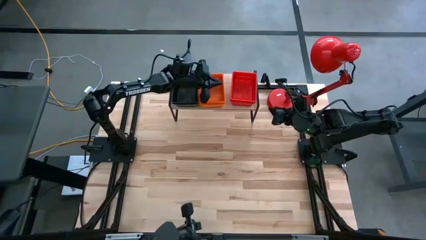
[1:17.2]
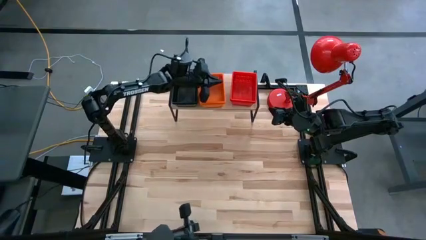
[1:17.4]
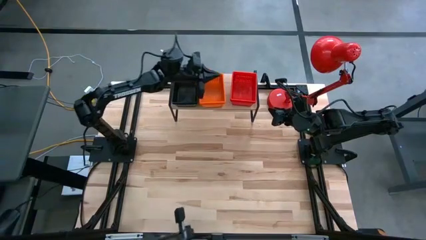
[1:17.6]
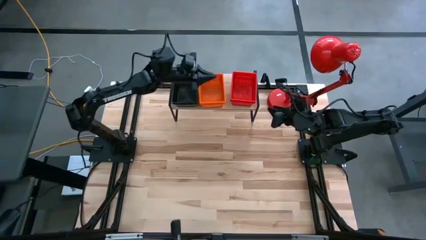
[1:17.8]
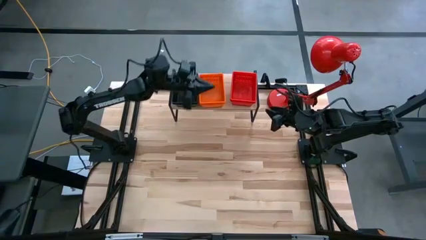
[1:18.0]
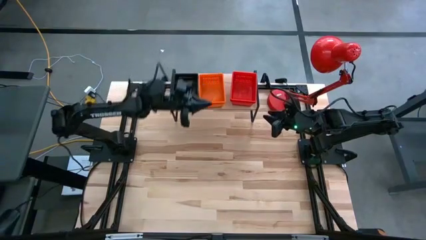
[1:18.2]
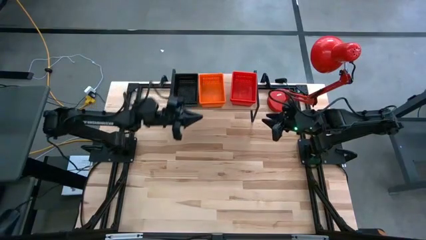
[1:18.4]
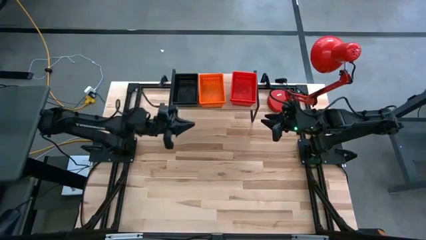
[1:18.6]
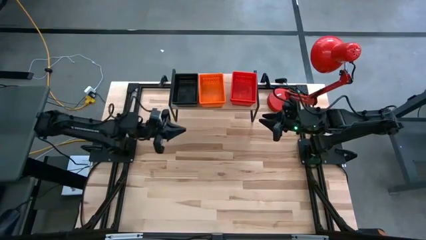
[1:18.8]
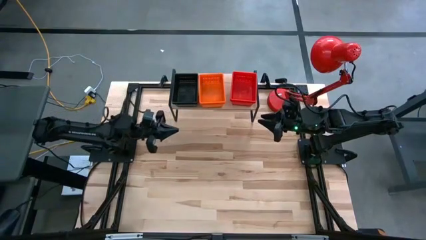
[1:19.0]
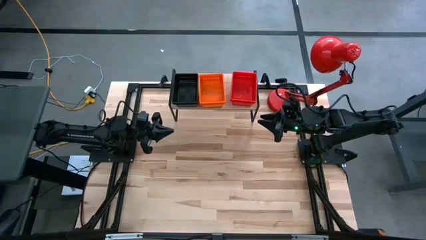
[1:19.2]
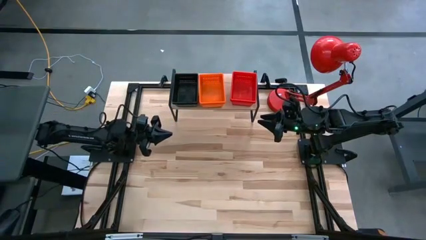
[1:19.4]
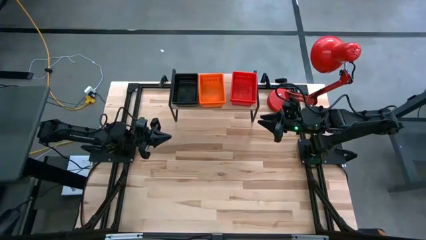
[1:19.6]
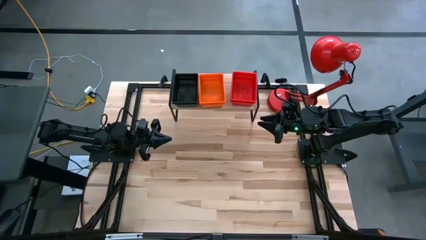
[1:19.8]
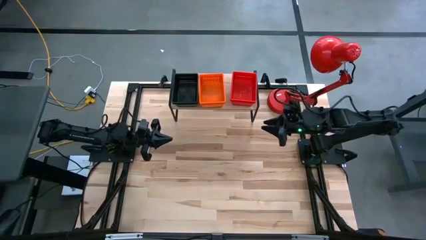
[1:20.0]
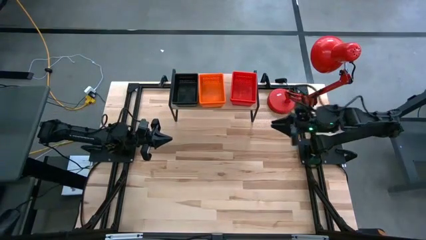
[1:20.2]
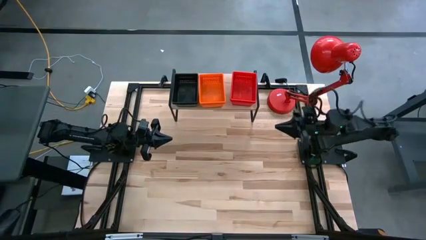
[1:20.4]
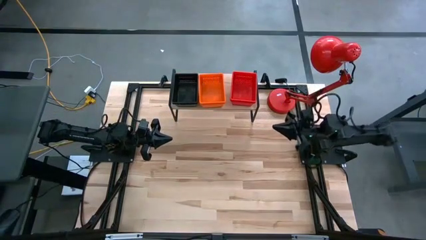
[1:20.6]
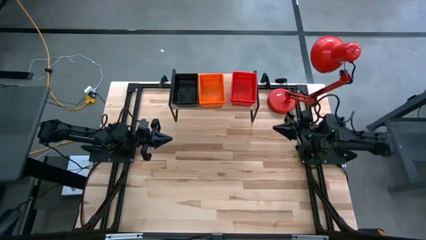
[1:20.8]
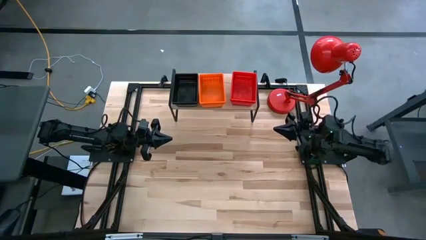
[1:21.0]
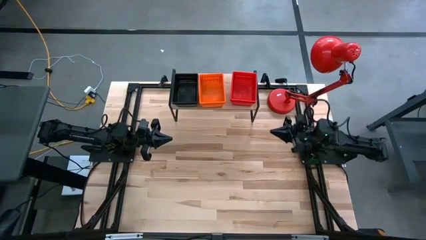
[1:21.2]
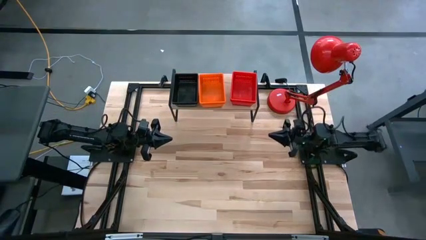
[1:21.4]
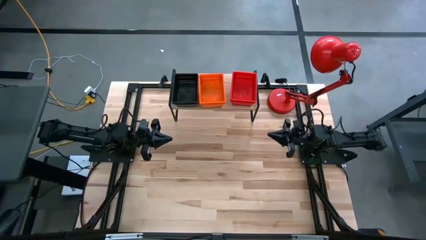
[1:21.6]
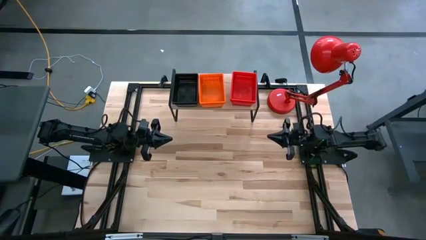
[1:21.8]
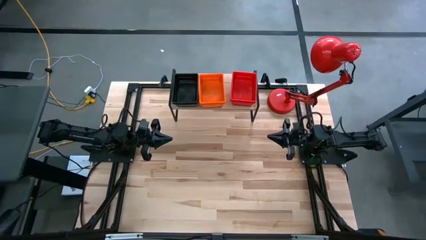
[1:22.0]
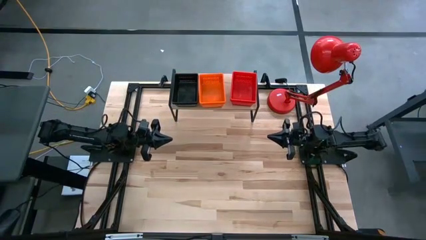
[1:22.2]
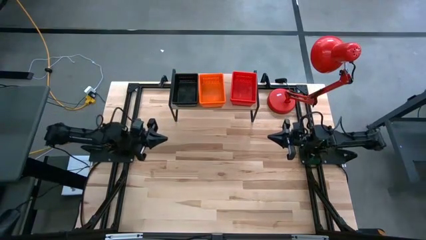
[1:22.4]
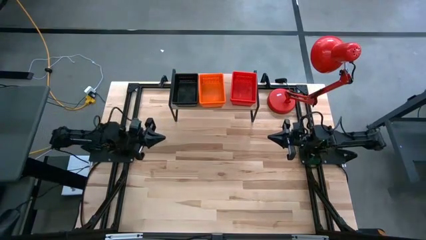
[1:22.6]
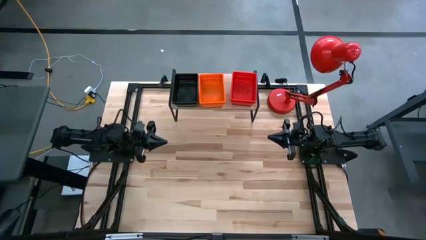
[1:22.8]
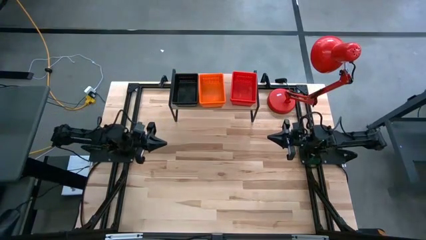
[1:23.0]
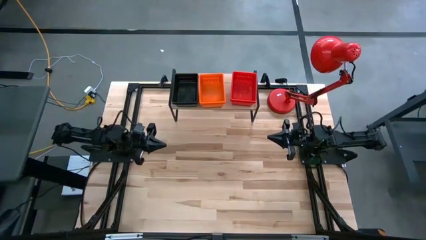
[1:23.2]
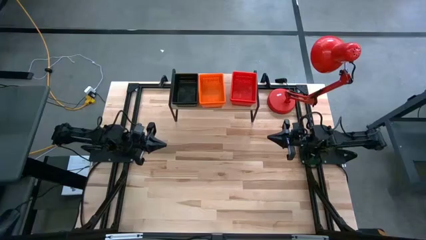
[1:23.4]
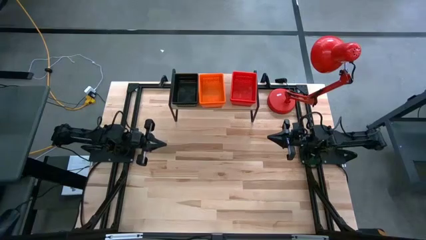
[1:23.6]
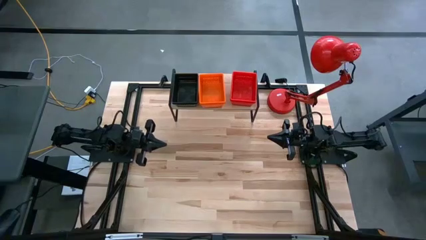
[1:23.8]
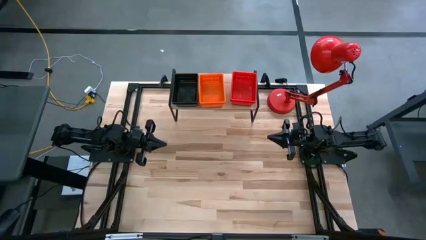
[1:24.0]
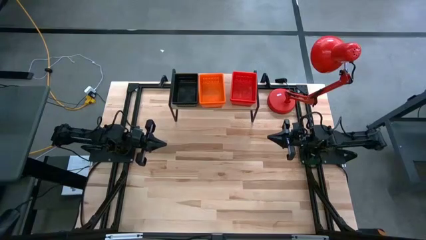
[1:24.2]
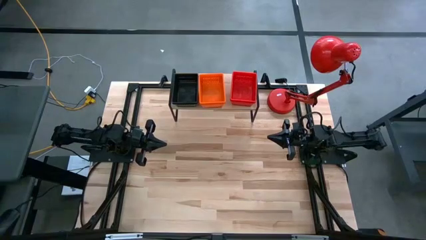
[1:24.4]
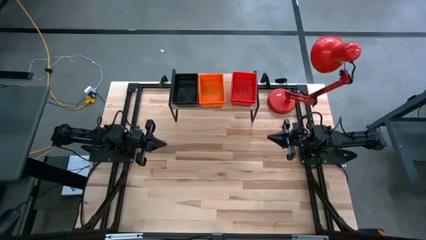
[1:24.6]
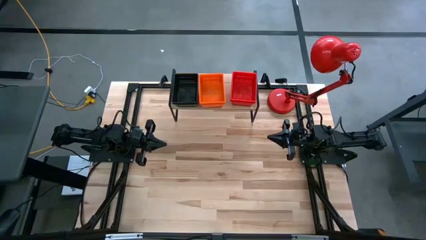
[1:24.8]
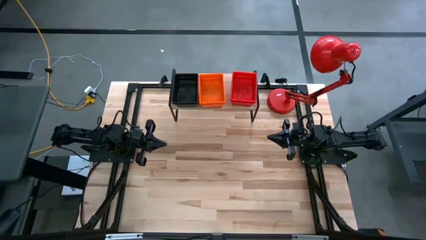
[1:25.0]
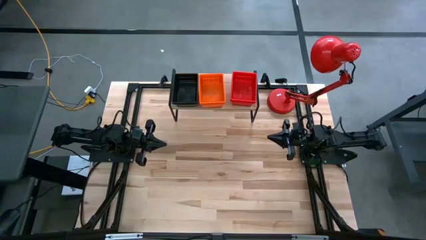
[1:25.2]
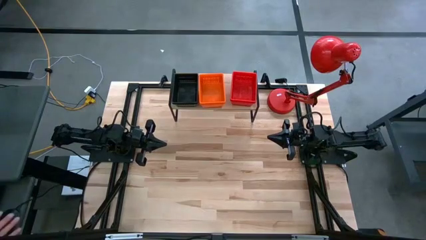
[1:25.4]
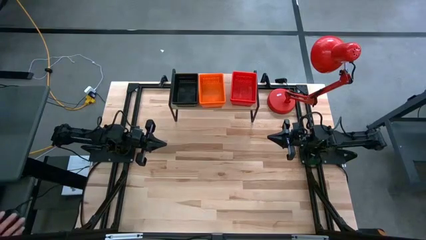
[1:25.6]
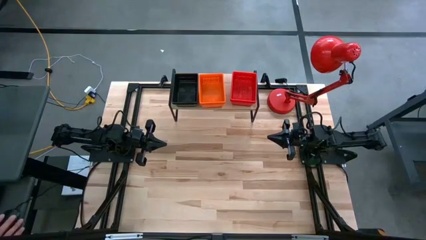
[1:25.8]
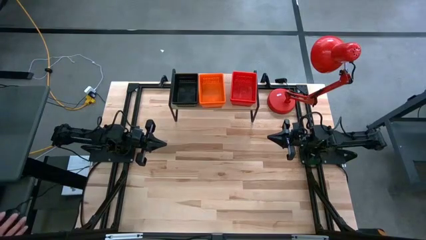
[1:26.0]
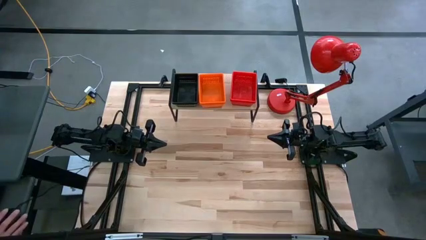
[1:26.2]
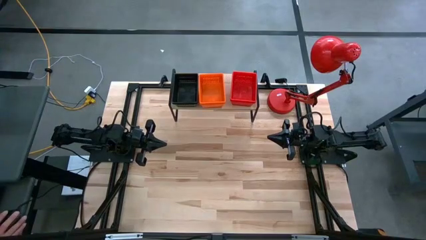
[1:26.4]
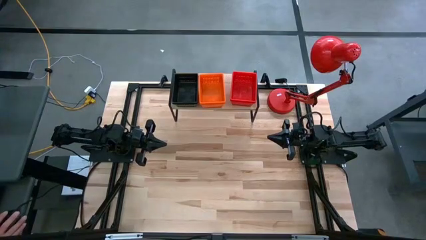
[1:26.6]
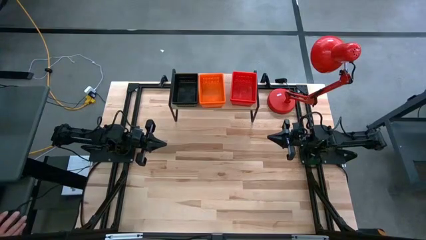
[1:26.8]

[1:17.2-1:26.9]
Task: Stack baskets on shelf by color
Return to Home Position

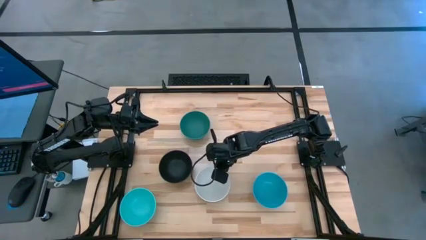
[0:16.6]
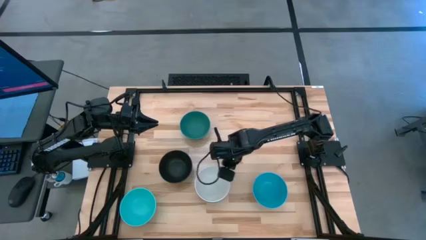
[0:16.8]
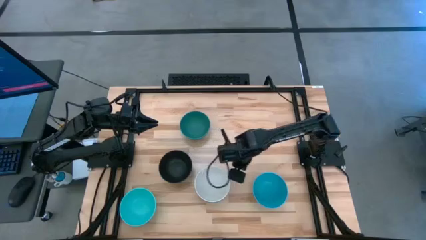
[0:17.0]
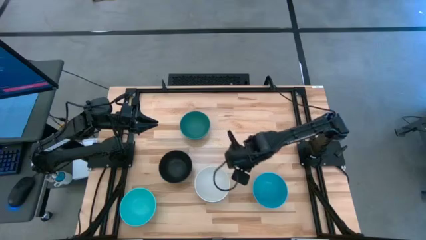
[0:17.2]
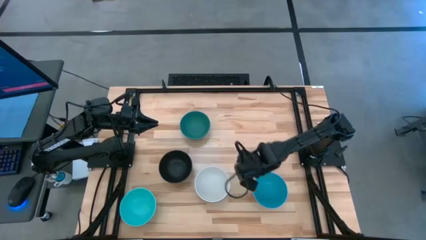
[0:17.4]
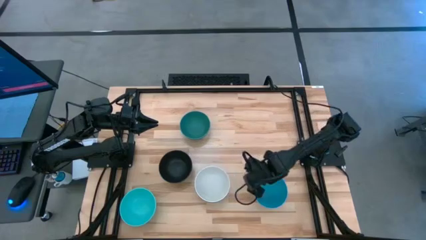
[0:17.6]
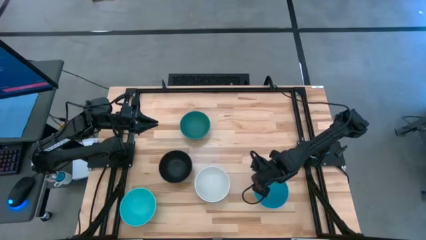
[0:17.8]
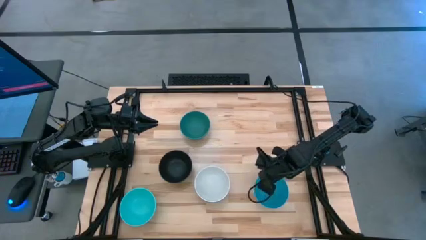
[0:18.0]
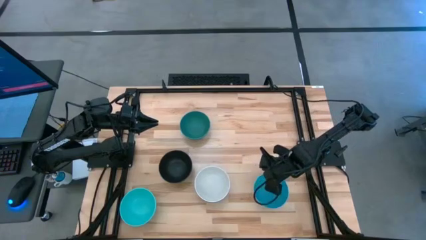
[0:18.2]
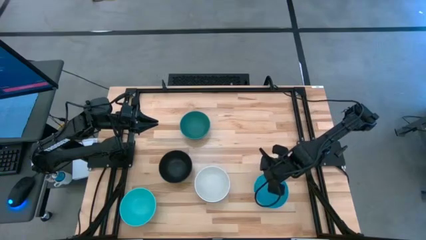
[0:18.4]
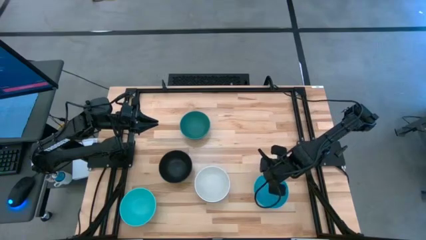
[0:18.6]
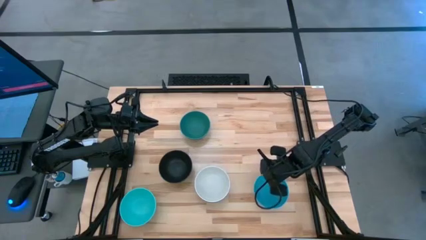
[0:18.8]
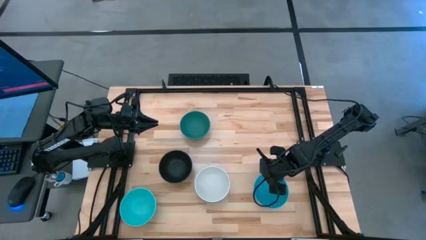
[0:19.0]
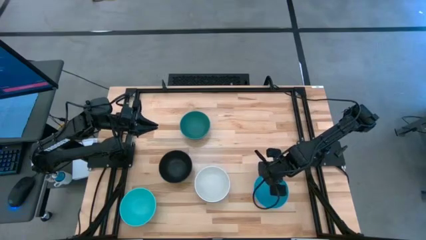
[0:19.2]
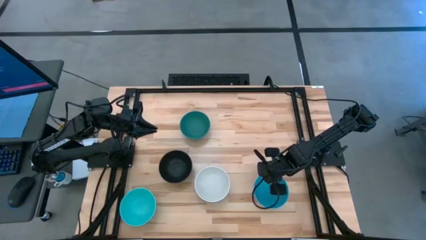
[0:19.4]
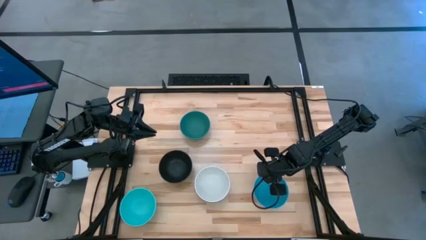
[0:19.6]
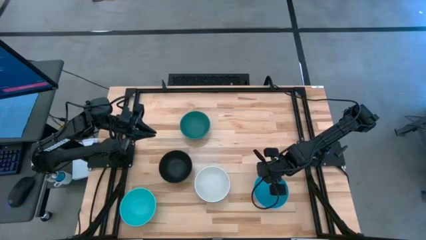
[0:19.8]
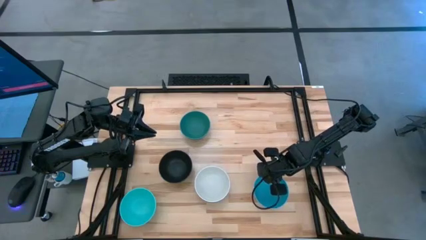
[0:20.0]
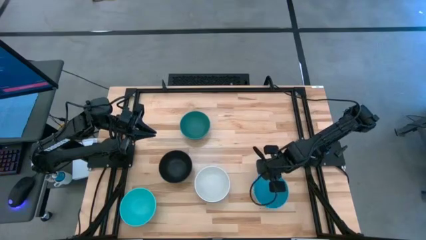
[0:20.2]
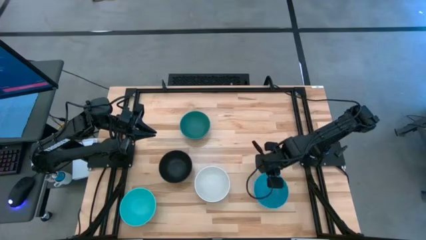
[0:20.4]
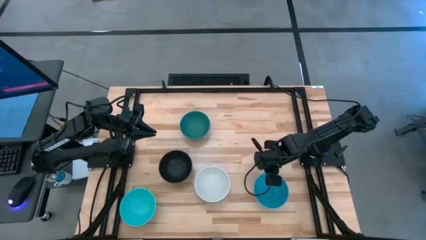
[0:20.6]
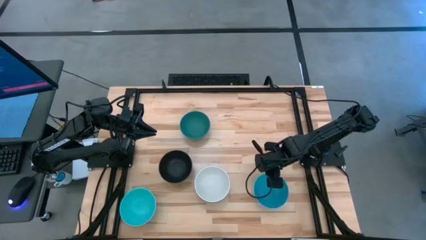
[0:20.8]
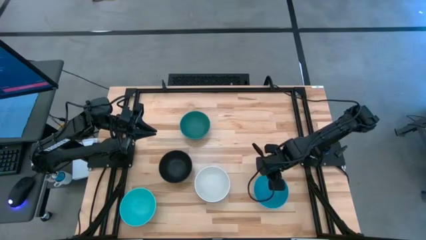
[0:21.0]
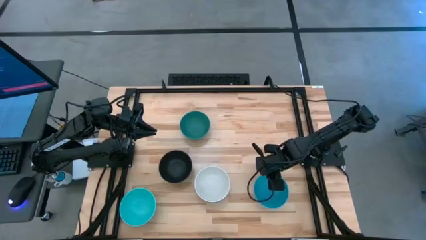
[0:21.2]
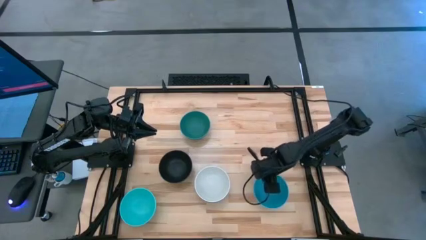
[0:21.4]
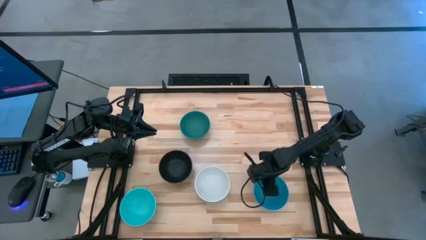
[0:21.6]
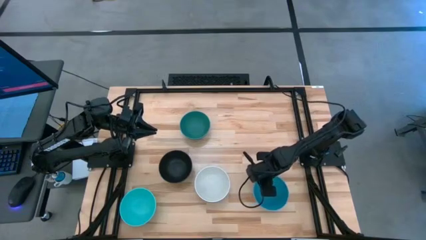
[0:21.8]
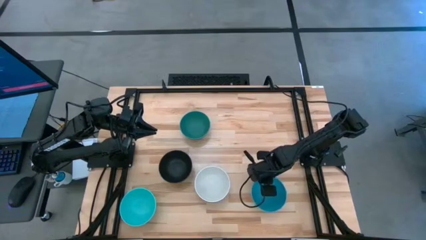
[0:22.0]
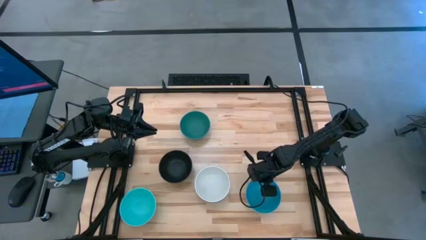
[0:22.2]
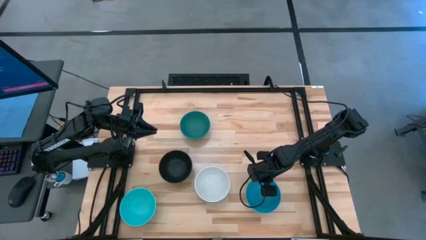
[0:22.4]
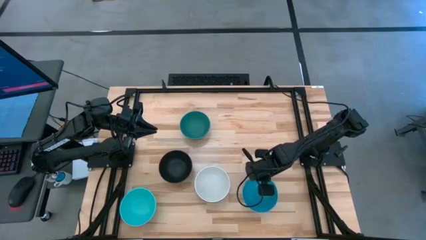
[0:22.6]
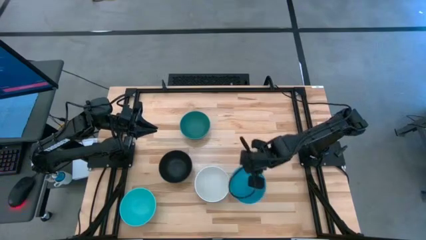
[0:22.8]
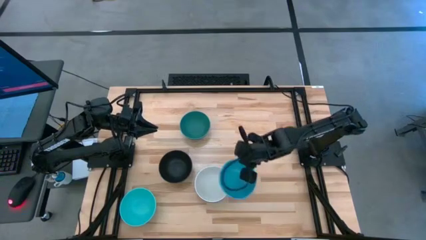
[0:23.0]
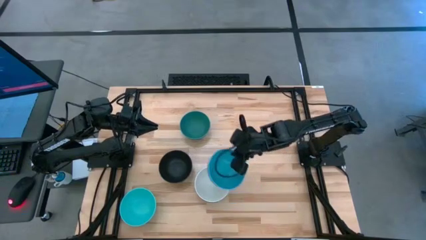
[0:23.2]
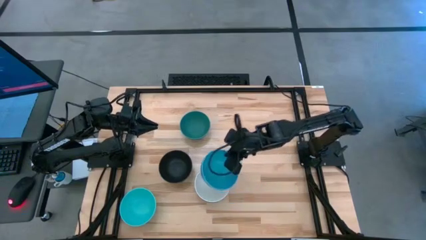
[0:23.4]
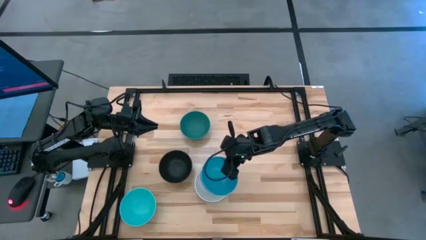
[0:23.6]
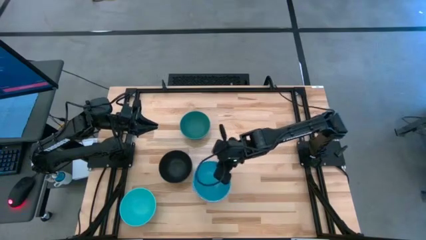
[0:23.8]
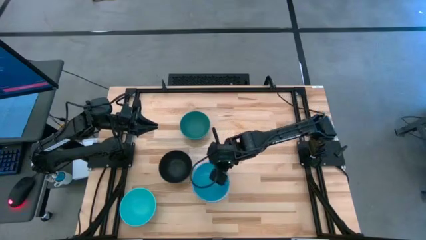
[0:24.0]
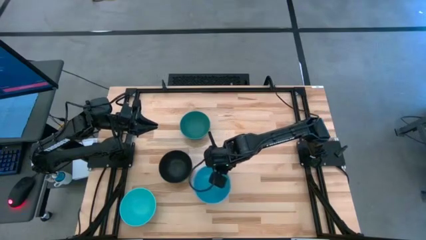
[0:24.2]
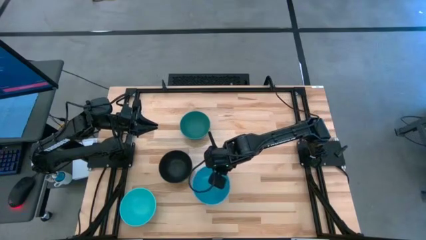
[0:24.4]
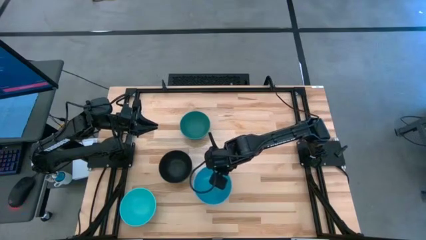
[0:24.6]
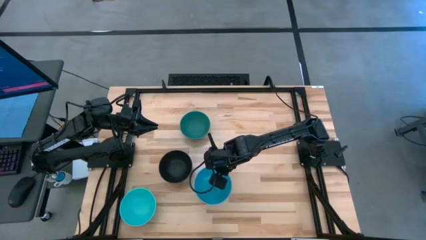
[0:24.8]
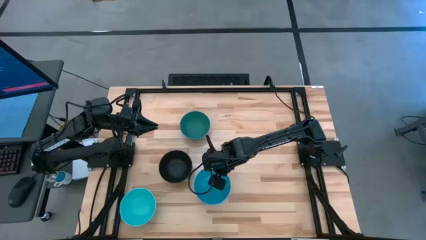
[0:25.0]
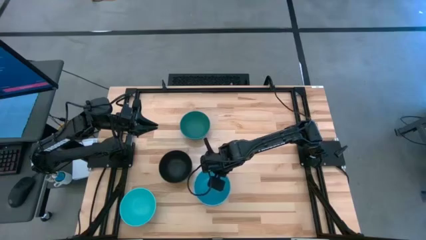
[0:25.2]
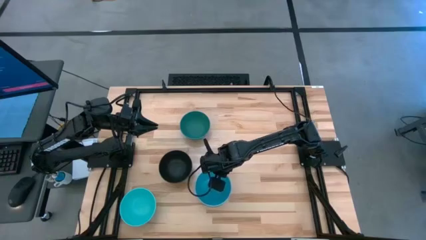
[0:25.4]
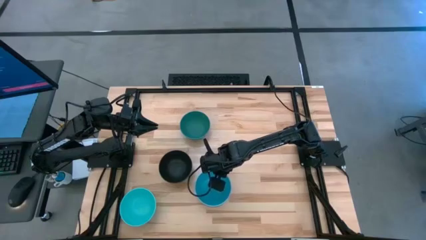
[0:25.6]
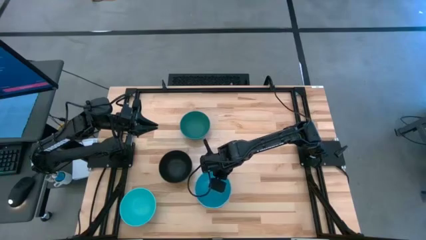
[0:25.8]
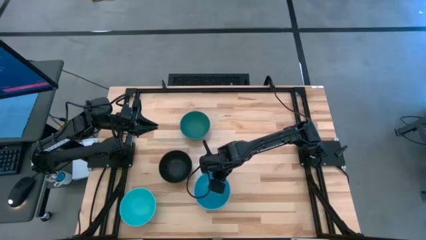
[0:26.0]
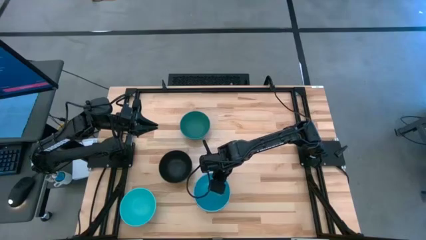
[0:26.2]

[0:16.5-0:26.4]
Task: Nest bowls inside each other
Stack the blue bowl on top of the white bowl
